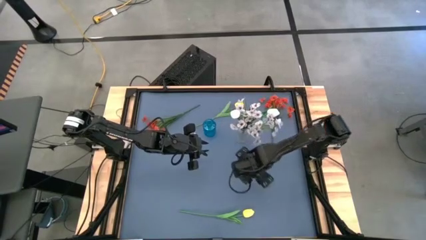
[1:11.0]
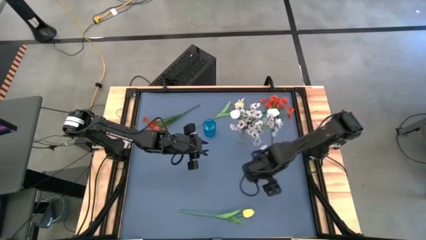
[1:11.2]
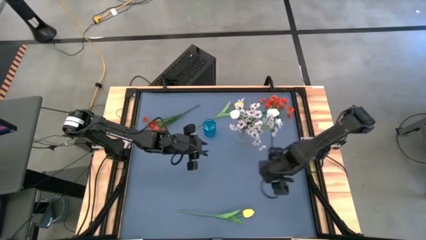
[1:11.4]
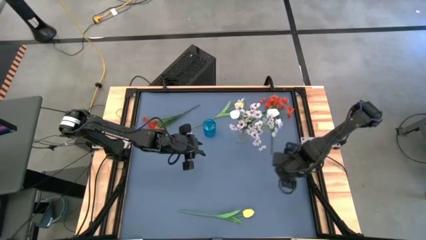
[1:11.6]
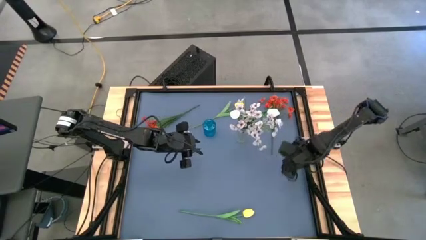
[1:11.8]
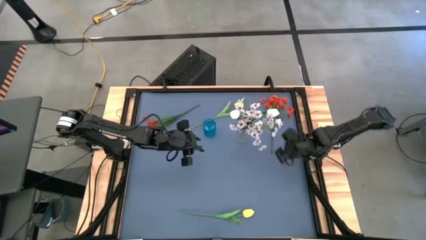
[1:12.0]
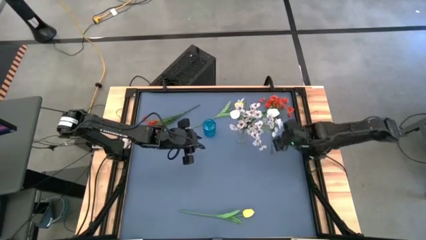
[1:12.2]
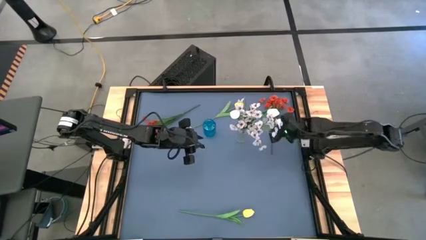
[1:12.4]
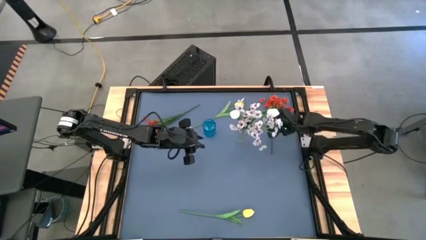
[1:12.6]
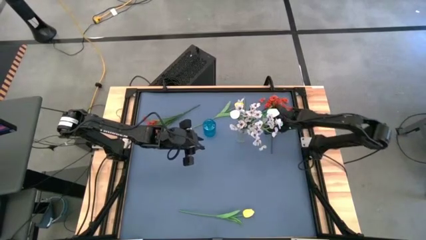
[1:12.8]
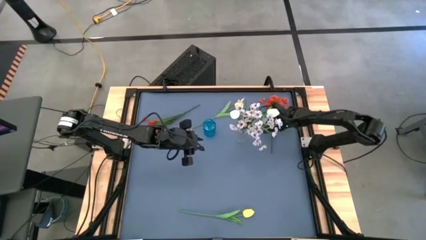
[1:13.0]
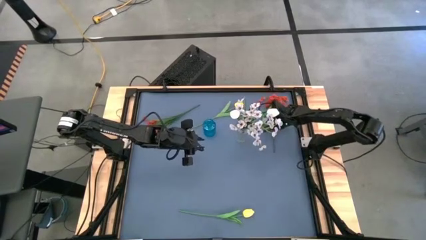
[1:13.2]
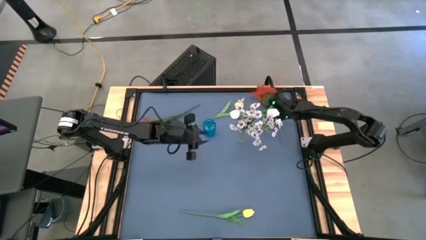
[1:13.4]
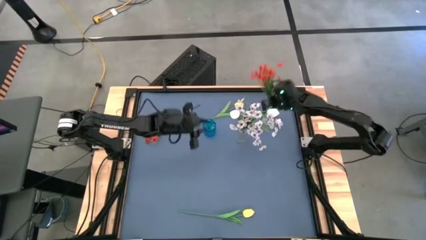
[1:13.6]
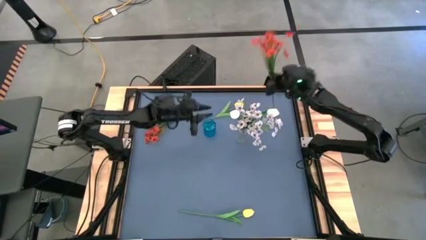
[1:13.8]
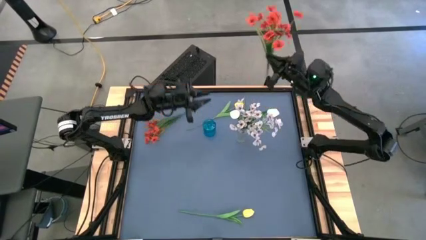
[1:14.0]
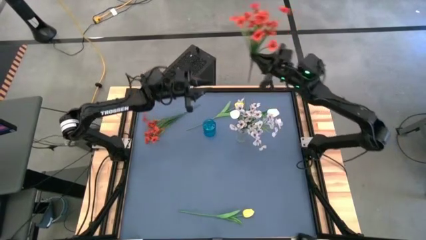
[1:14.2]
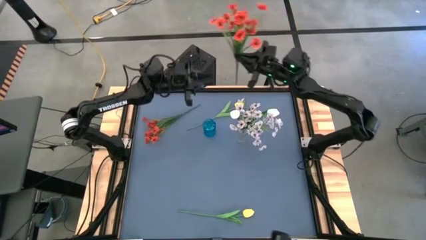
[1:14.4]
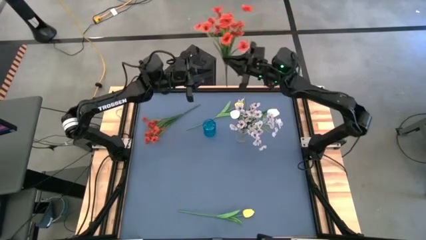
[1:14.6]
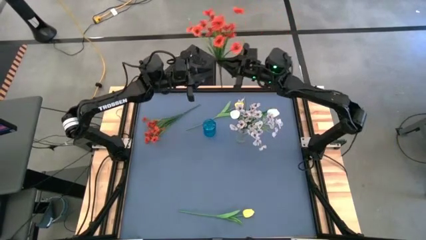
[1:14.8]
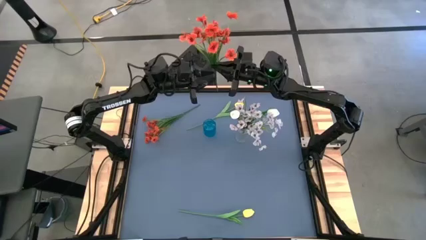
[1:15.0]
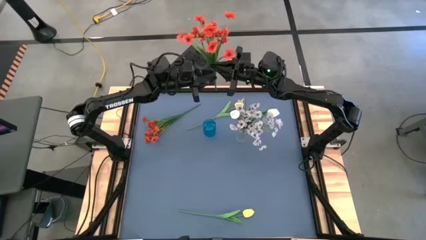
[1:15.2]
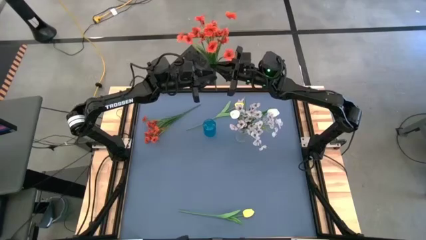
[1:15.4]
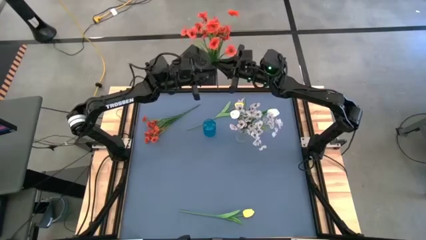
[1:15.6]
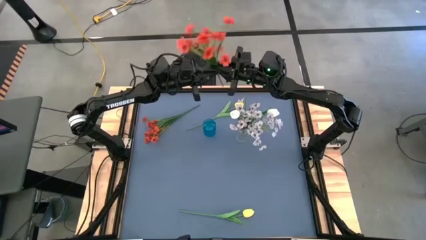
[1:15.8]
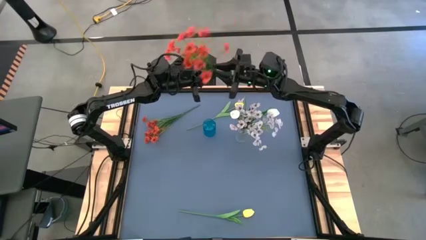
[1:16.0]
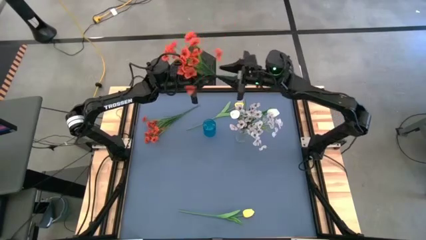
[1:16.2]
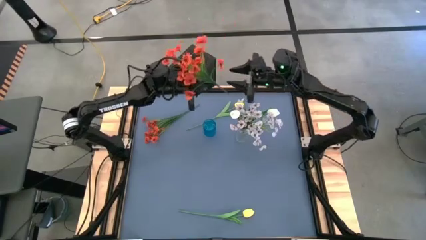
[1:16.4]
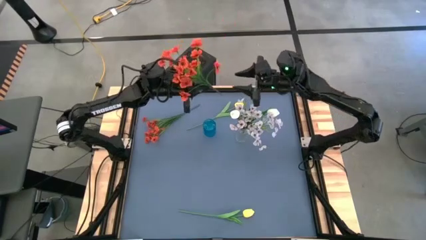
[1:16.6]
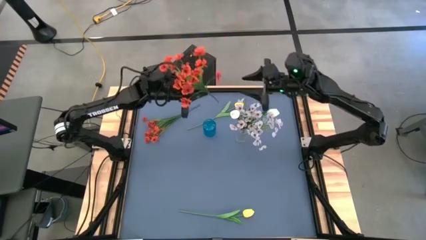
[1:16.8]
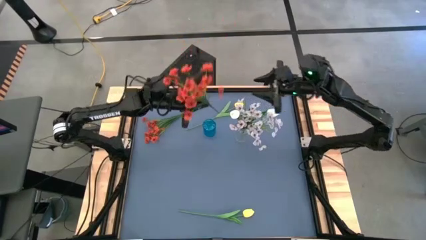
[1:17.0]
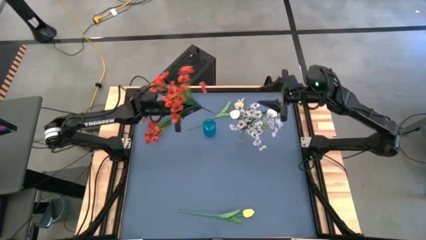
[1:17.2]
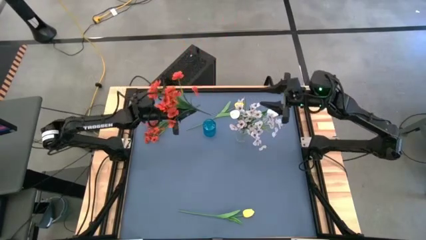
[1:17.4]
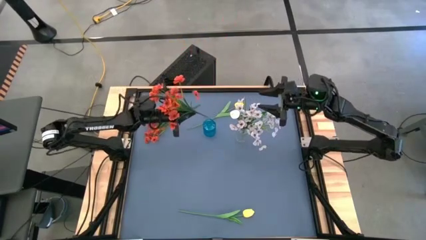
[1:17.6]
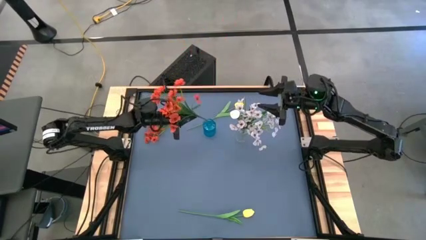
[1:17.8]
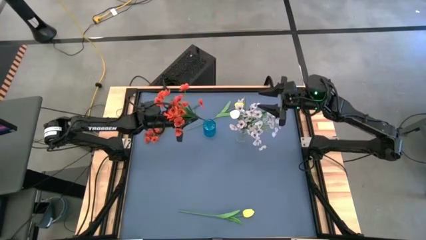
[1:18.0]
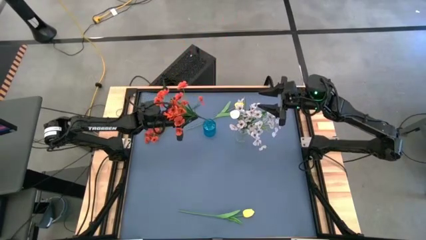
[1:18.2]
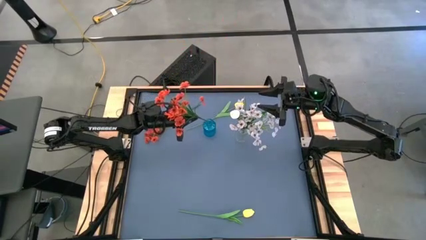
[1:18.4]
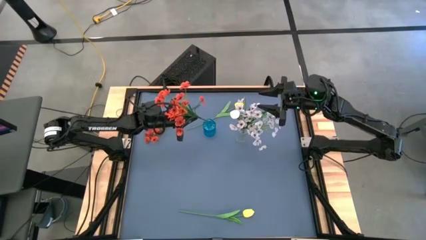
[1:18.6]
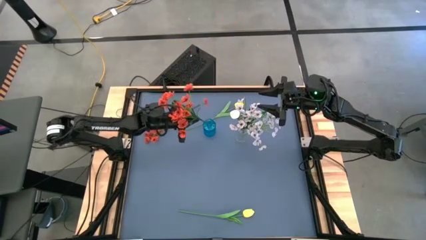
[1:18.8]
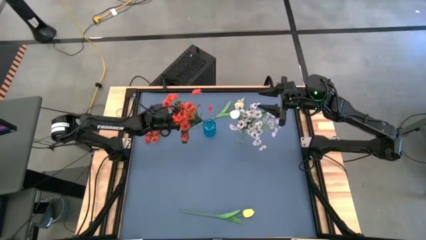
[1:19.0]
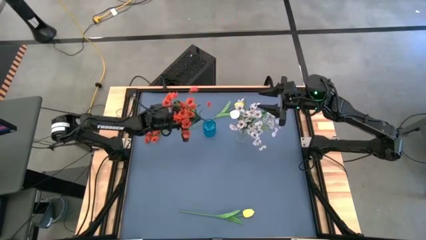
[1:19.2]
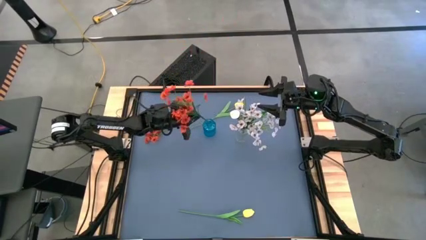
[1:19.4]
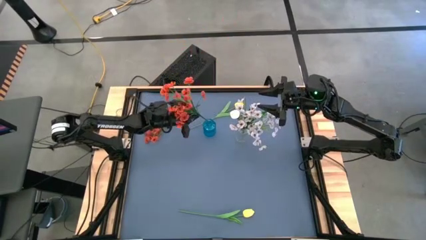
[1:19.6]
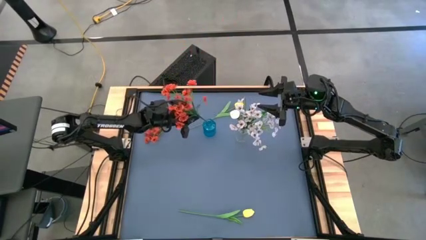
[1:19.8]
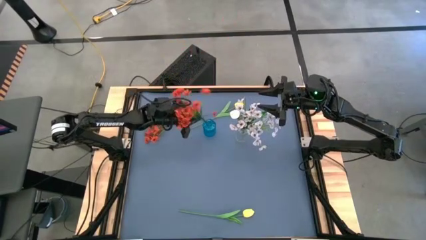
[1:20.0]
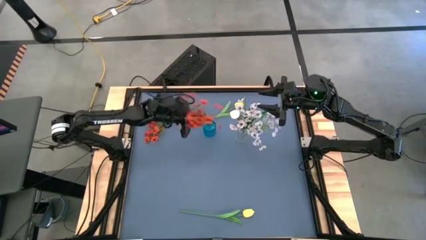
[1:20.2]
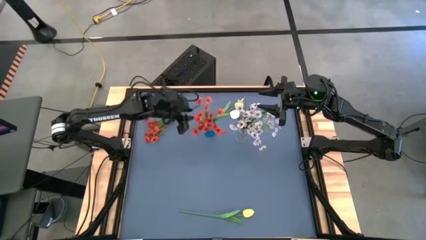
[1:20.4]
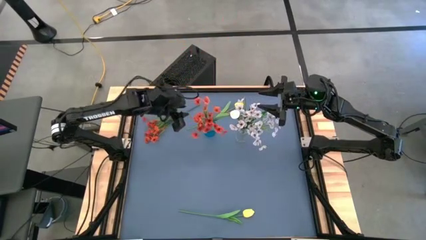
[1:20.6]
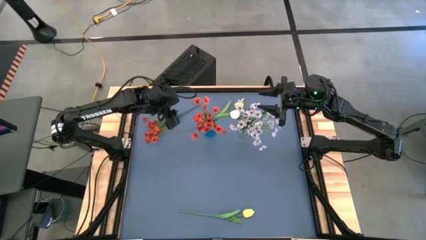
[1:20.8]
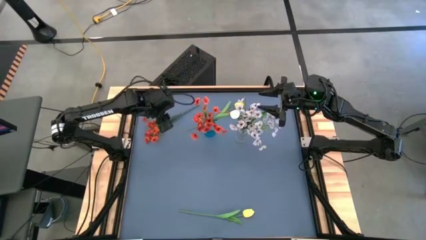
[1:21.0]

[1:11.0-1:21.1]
Task: Sort flowers into vase by color
Put the right orange flowers into the blue vase

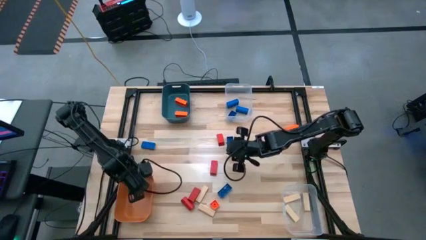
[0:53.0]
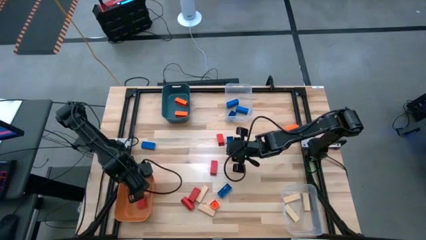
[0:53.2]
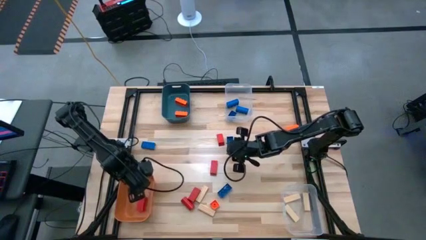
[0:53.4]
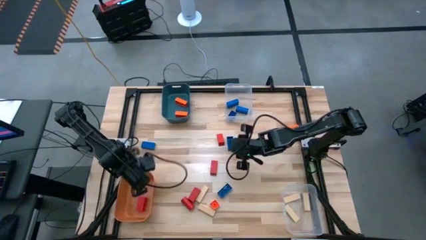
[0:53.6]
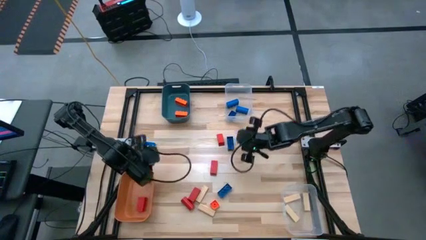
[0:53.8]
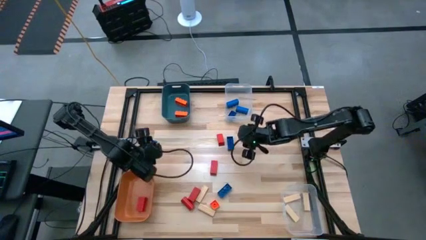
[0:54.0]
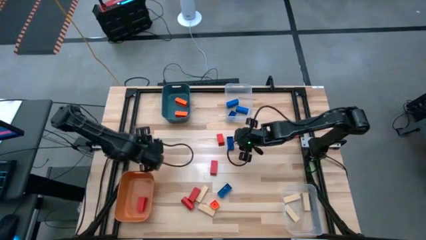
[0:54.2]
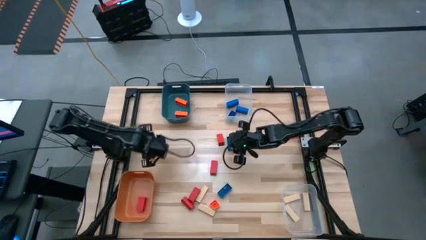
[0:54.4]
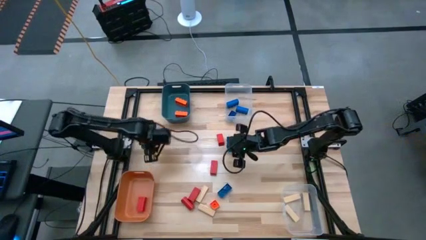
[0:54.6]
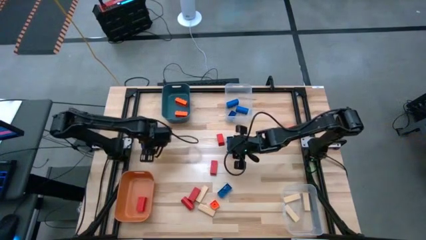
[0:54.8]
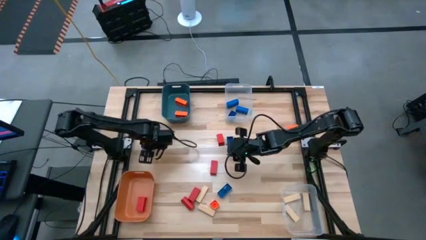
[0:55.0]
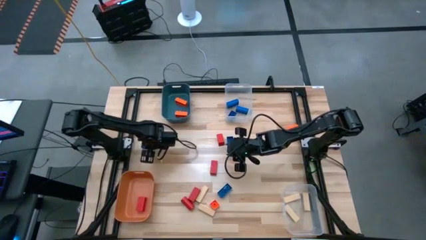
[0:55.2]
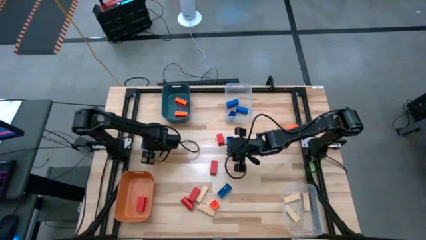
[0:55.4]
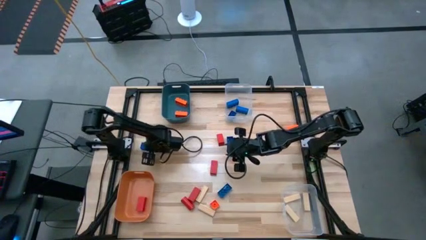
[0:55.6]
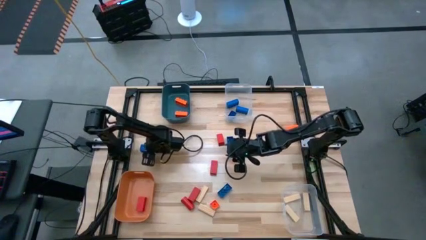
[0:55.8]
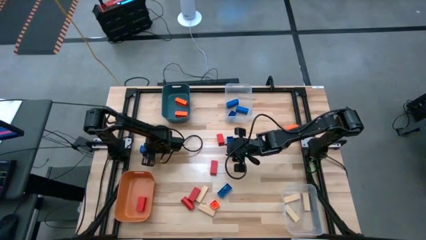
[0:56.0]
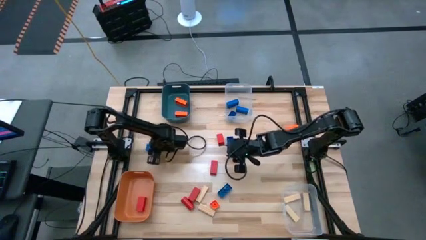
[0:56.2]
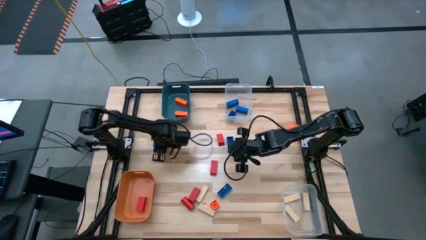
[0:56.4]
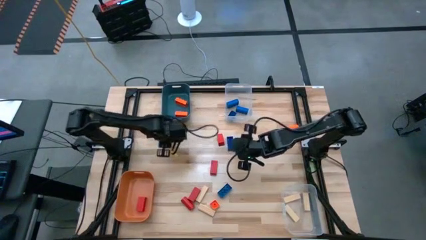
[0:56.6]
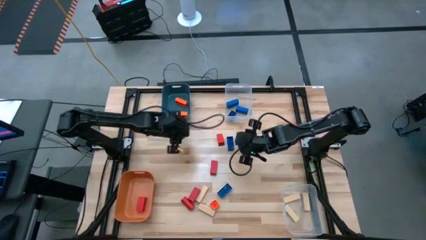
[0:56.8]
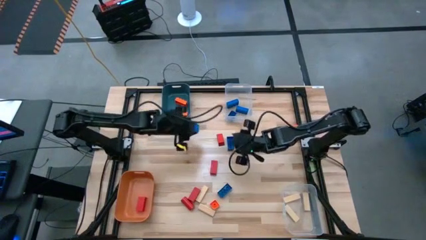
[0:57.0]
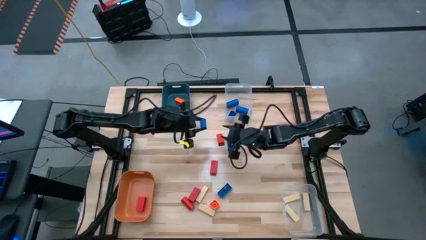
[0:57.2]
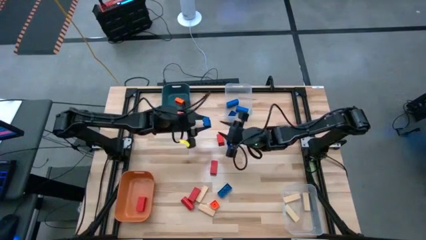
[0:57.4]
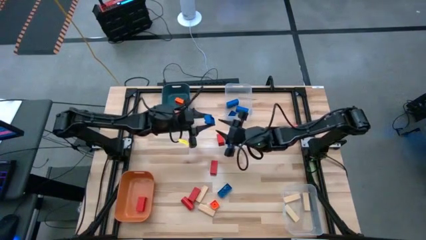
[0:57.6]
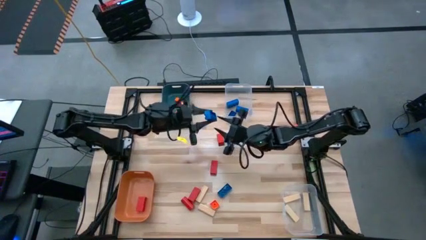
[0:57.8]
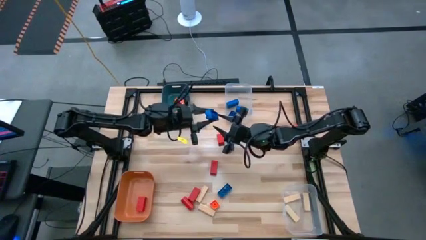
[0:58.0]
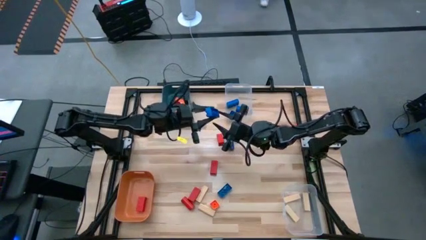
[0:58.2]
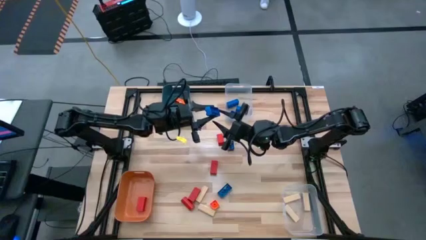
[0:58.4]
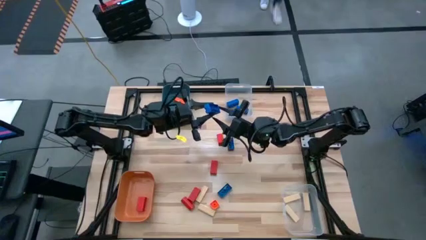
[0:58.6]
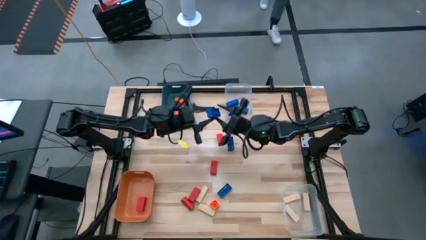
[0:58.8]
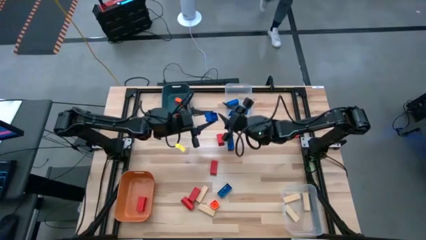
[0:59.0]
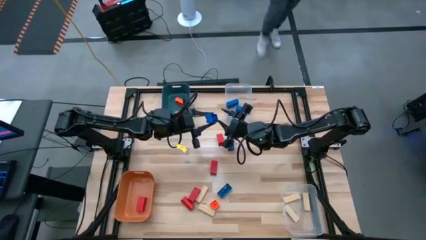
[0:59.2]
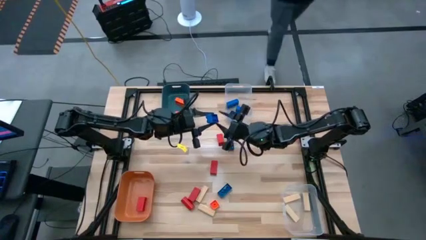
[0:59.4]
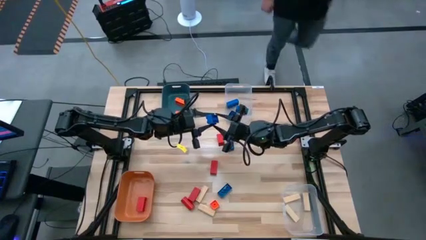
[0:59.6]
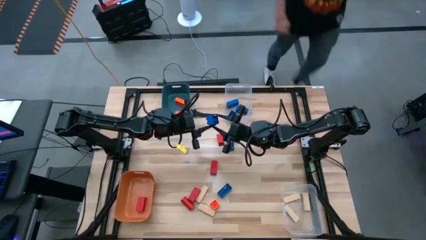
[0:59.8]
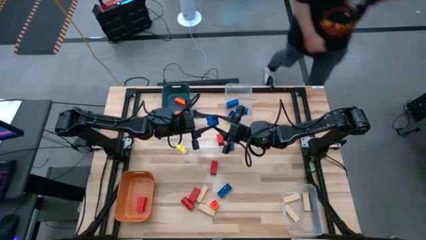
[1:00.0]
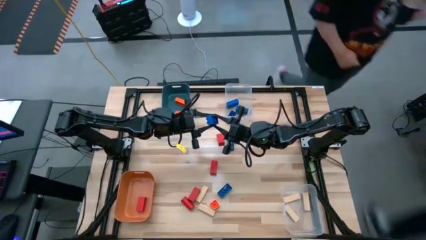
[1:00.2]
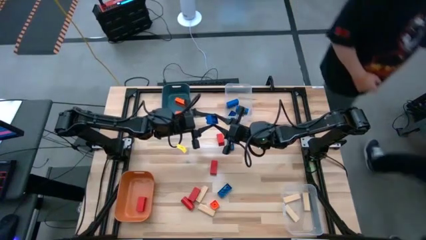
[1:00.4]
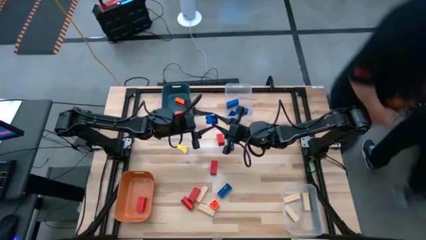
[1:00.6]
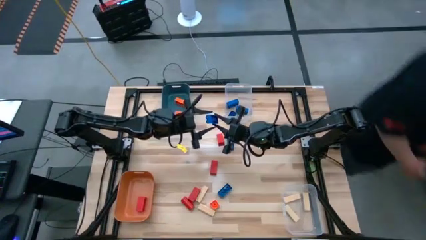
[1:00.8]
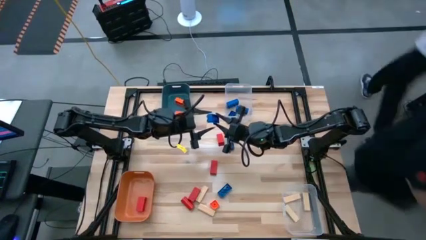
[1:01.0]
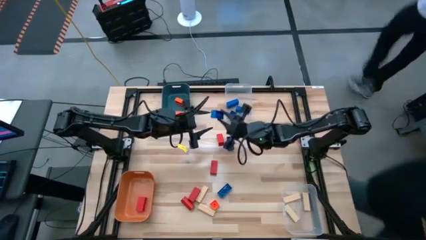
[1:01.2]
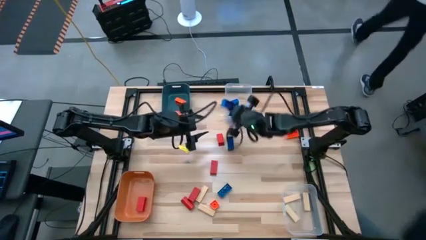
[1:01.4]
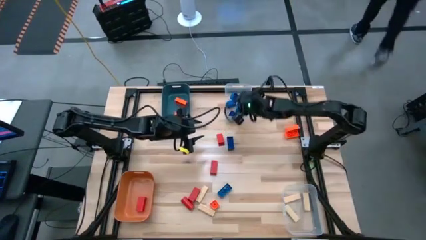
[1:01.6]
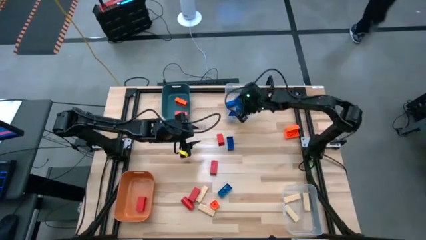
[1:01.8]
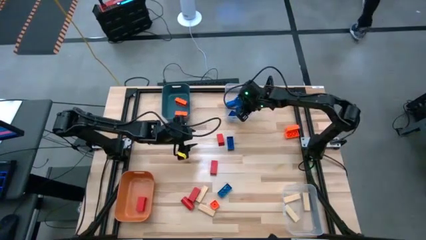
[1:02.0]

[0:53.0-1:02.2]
Task: Sort blocks
Put the blue game piece into the top transparent bin
